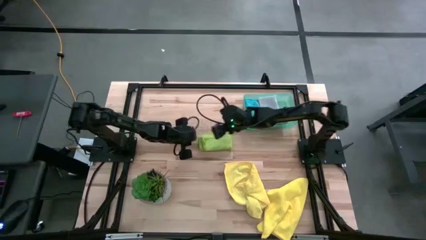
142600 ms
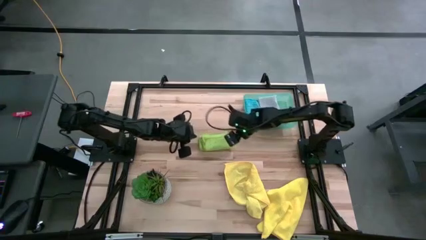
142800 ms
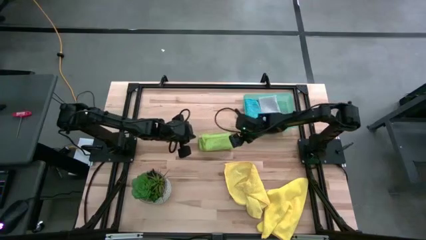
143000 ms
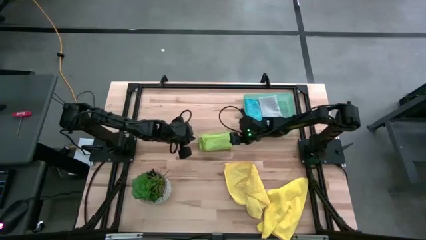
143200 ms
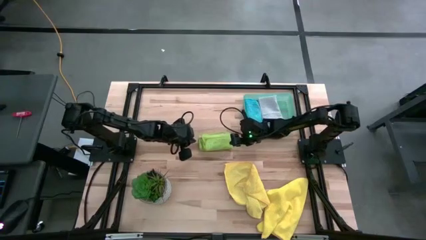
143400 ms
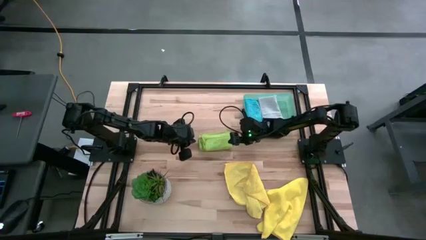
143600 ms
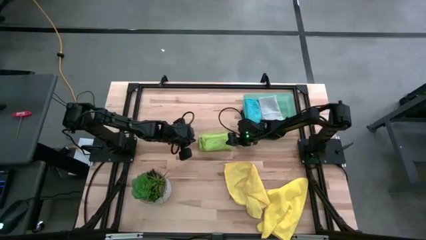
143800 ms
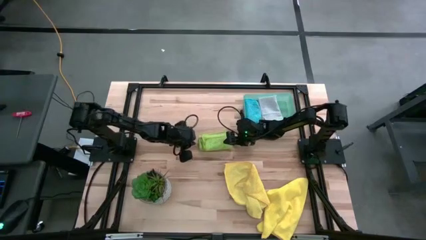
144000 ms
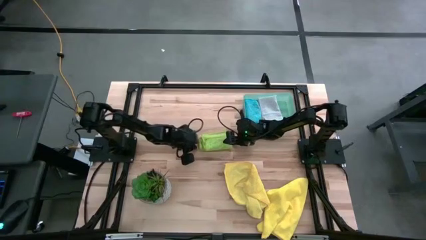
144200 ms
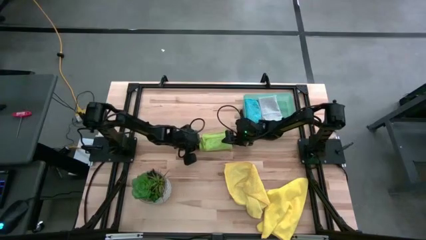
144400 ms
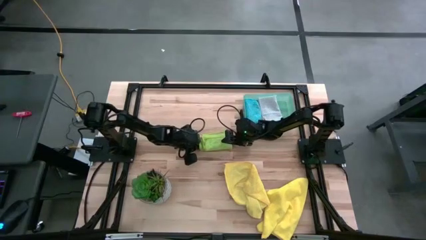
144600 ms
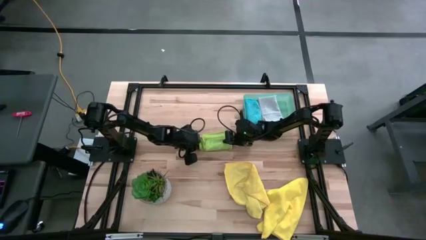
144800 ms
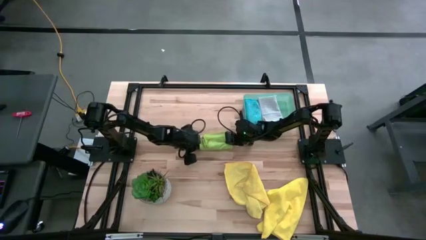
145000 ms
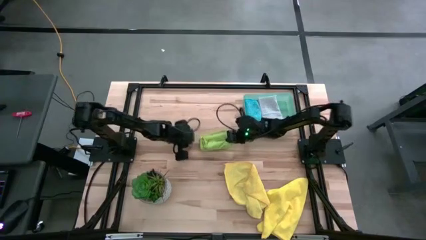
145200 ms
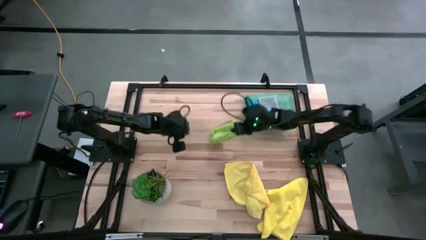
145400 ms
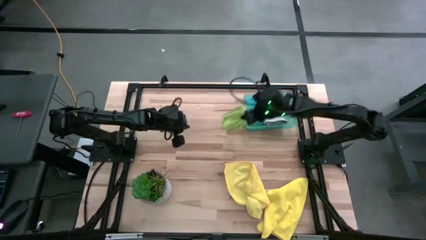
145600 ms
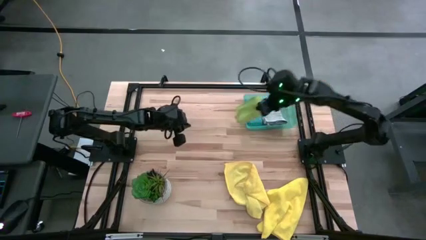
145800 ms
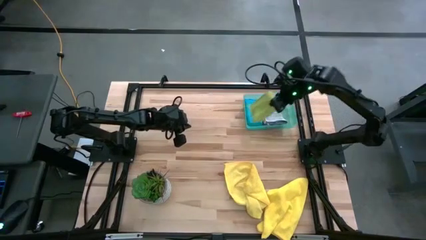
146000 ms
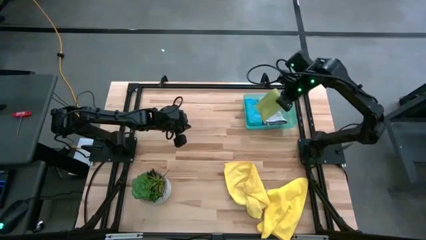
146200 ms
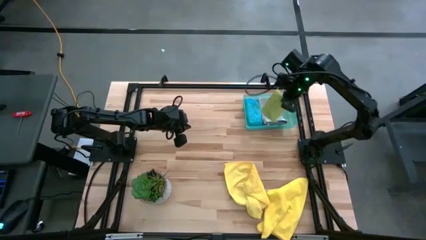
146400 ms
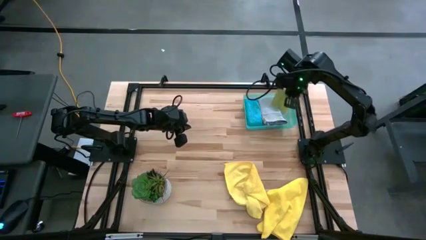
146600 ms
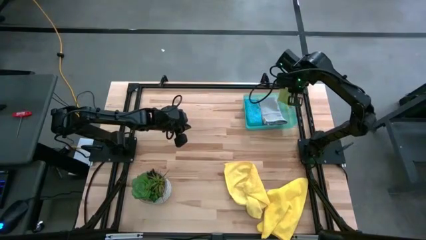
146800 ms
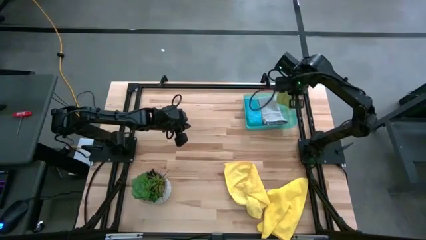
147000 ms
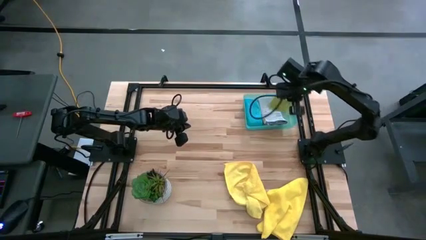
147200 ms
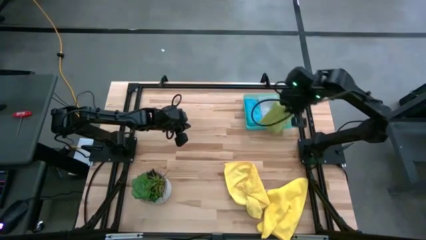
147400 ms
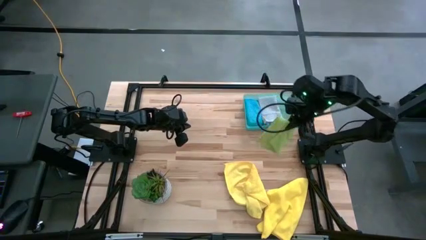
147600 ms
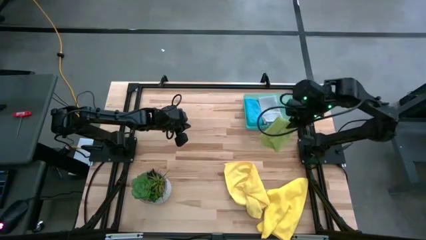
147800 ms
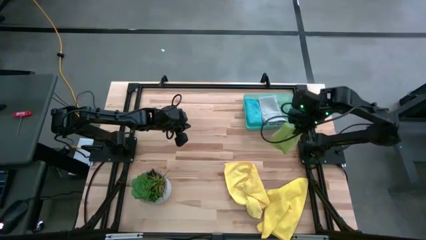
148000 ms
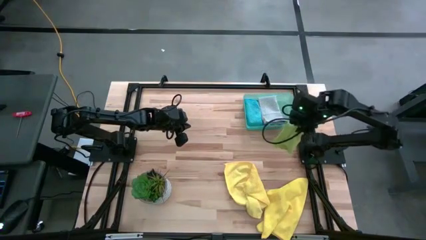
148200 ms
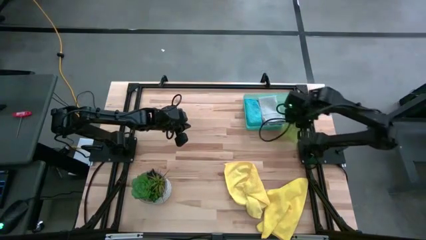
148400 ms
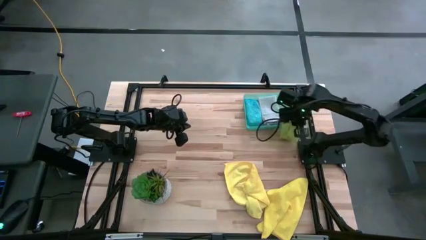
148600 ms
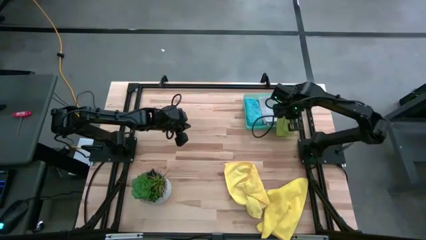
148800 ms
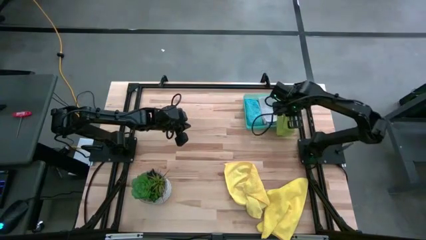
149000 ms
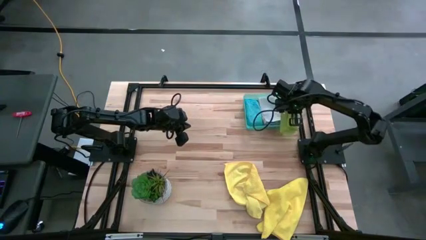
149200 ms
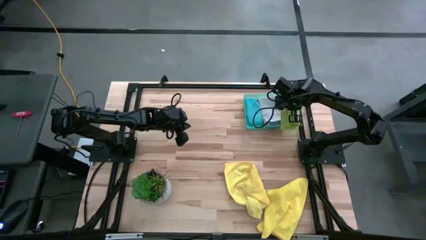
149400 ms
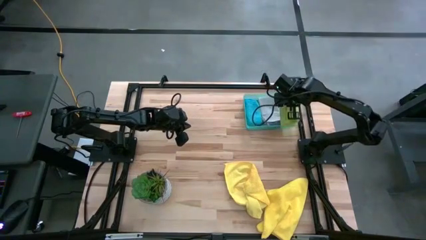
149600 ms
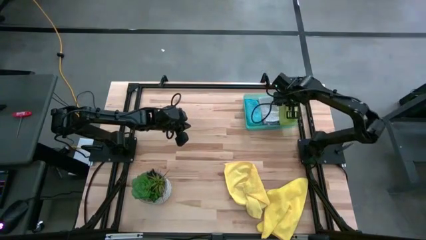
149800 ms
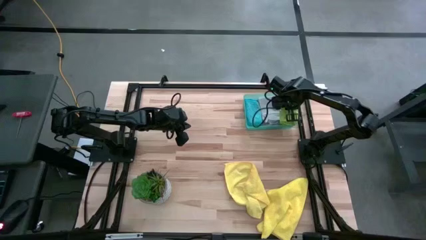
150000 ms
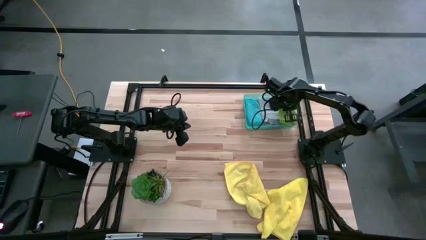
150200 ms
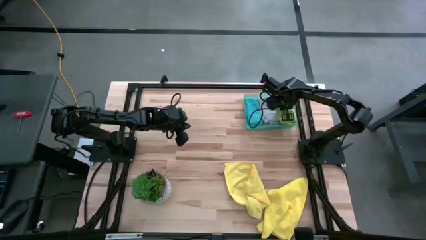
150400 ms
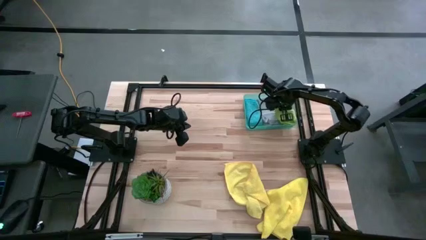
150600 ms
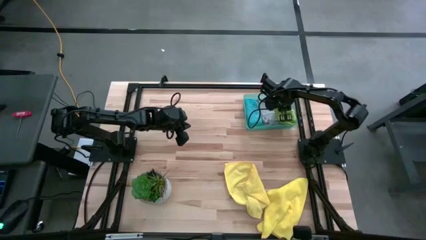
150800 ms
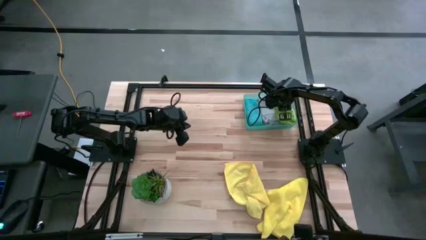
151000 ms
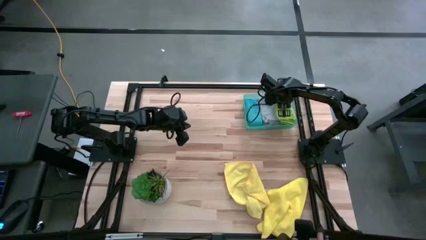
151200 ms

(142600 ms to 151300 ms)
Task: Fold microfiber towels
Put the green towel into the green bin

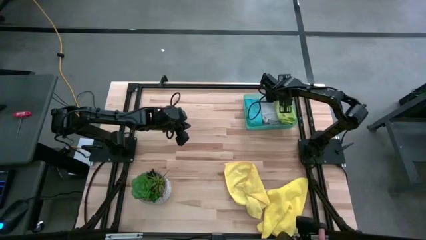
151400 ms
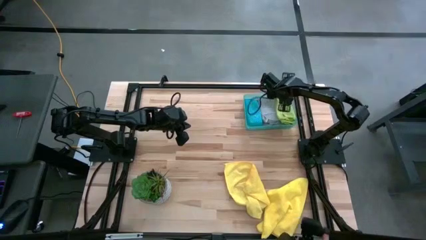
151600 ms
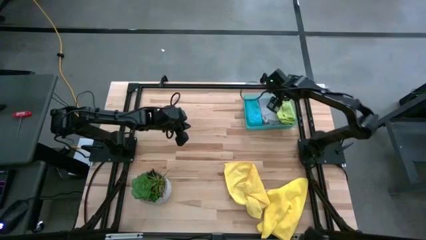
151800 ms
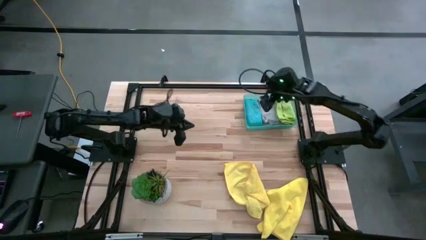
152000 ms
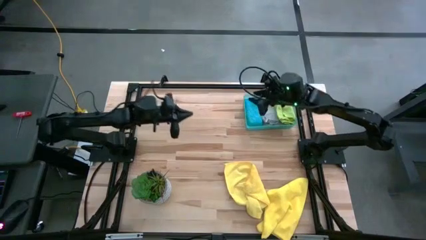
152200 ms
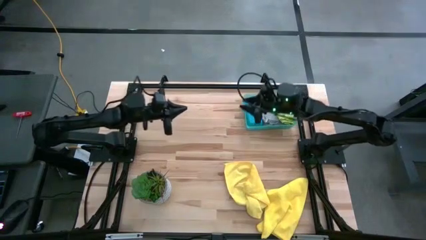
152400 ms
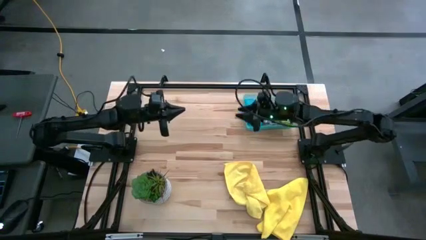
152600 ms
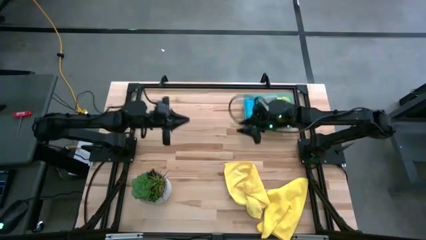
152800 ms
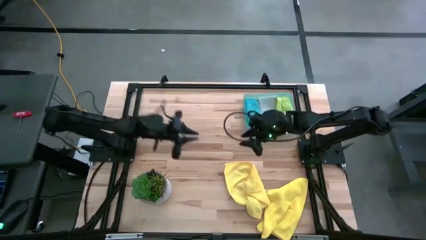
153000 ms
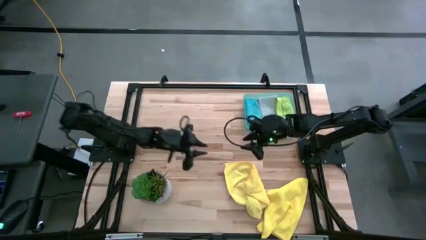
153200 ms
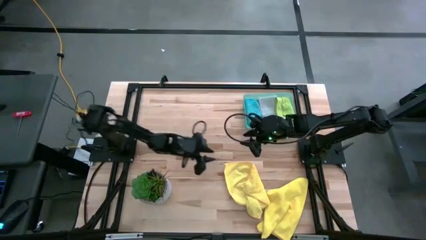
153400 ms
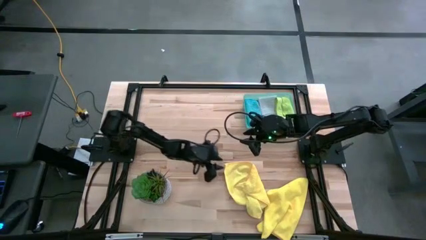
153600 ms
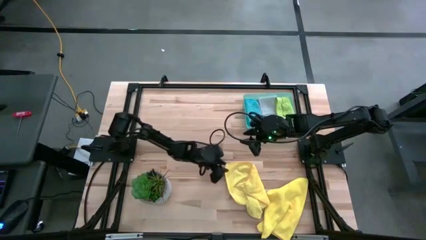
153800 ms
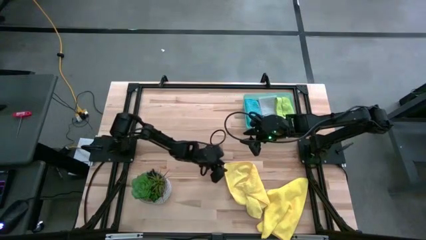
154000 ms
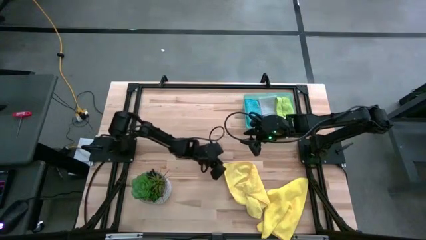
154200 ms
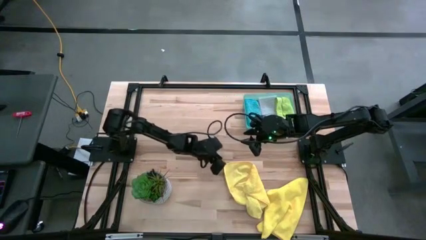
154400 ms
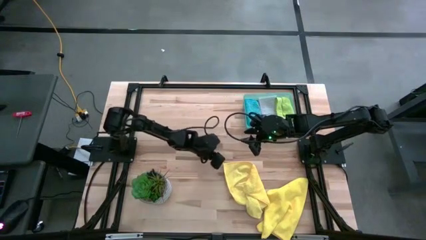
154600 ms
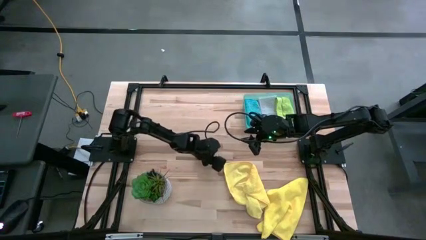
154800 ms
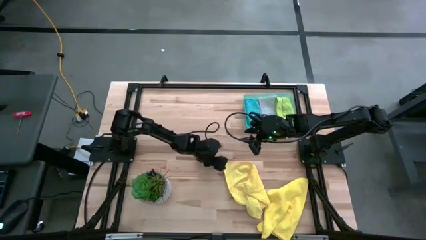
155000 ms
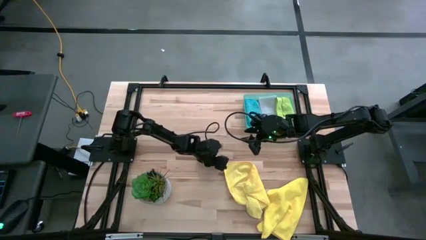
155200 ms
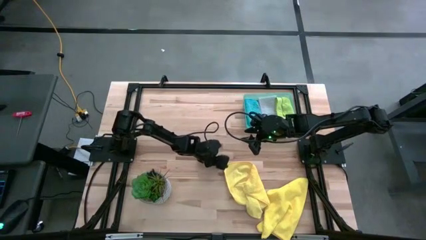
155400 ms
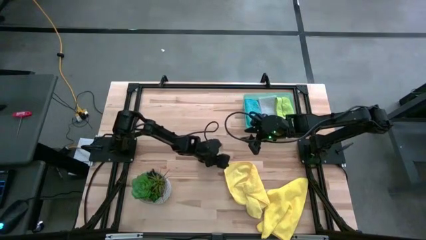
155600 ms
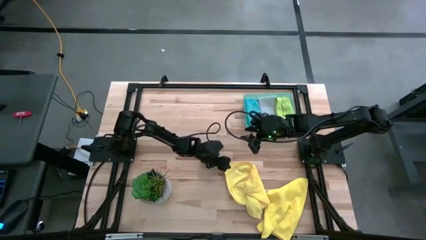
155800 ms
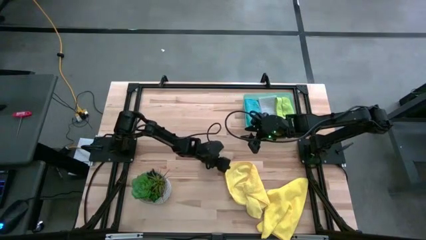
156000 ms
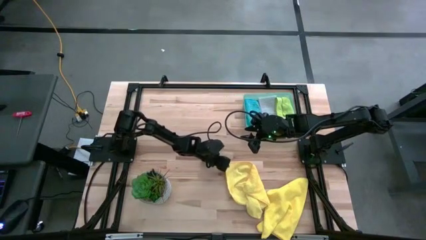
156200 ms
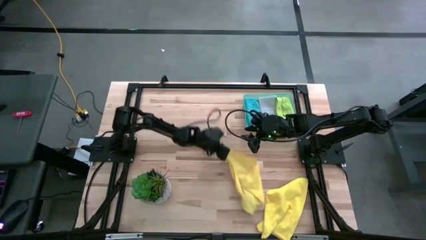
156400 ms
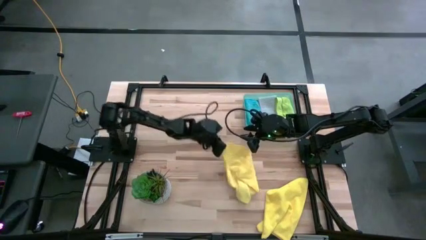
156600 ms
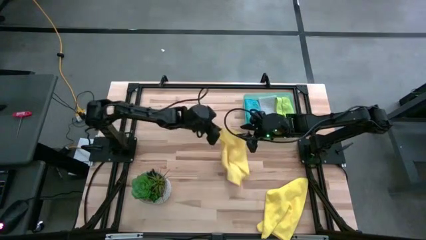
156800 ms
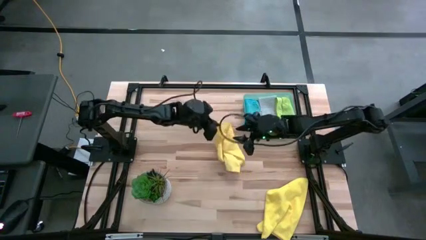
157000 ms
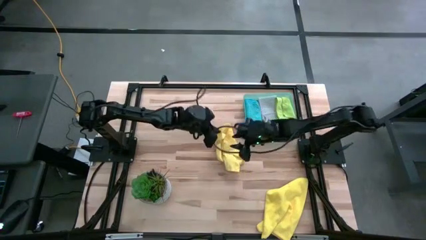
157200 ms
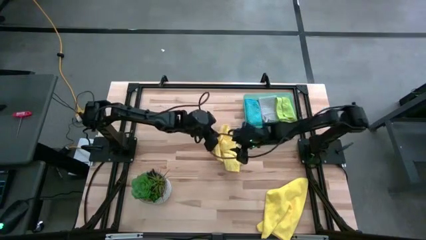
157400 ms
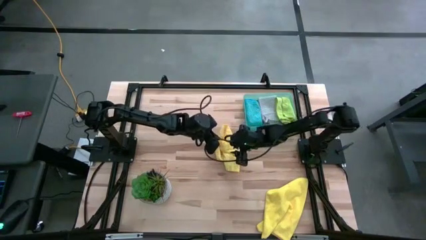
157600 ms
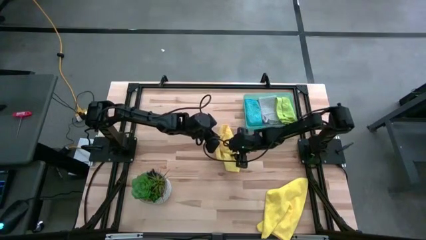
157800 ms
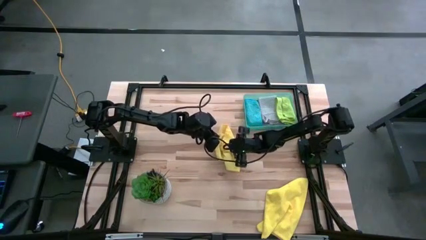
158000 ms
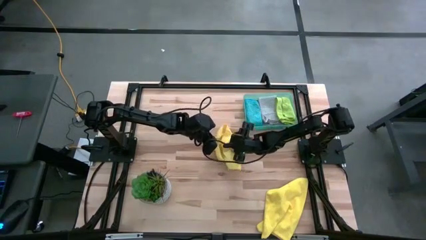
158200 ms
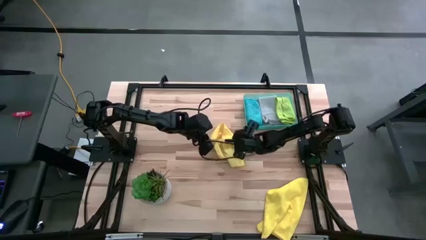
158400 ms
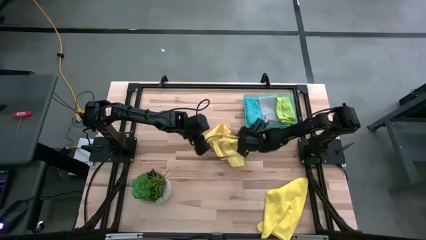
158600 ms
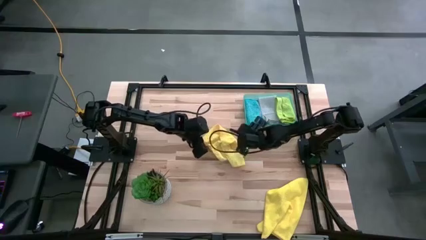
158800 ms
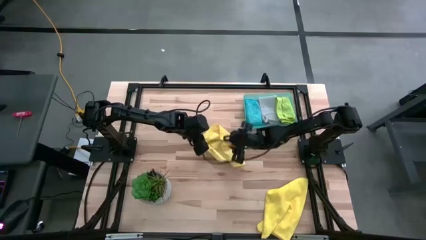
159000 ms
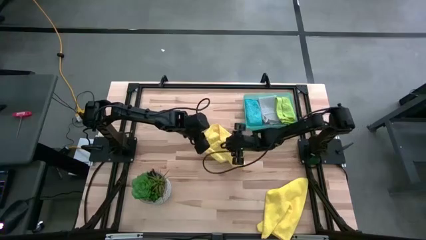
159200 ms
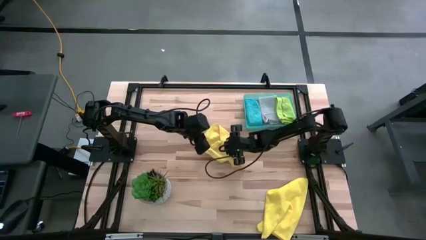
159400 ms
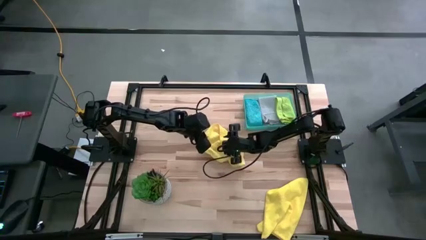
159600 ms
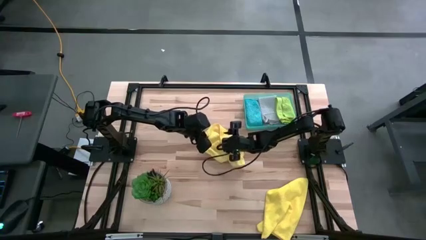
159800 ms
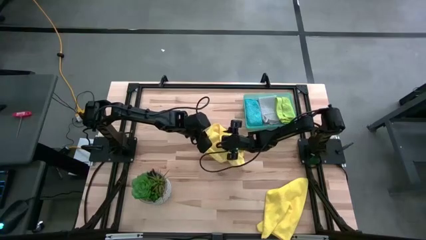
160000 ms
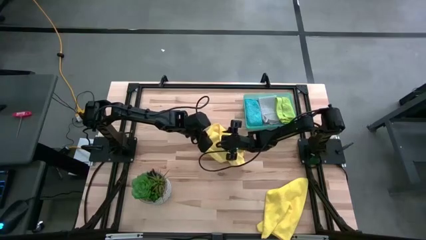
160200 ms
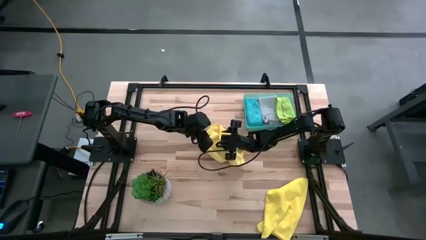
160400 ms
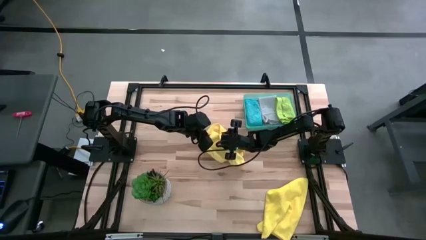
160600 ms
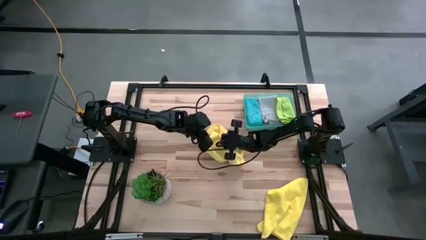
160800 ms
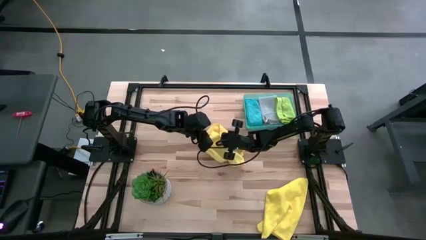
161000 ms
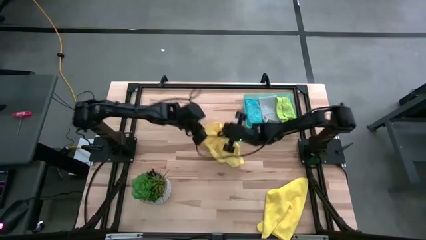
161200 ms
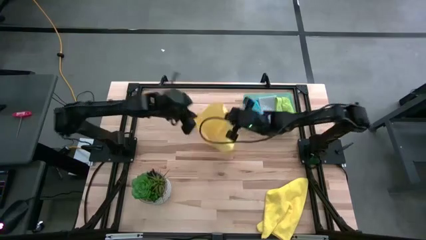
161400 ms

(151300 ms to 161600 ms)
Fold the left yellow towel
